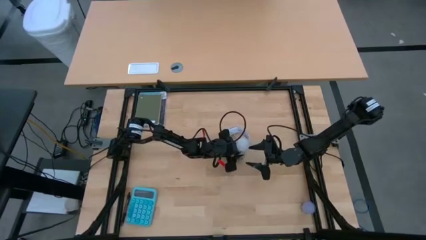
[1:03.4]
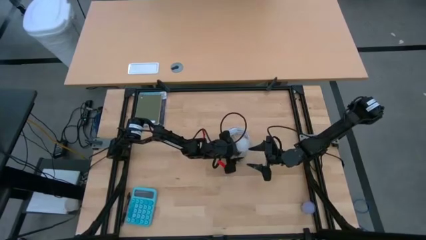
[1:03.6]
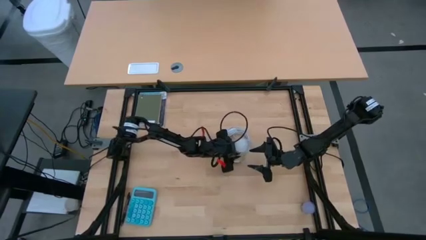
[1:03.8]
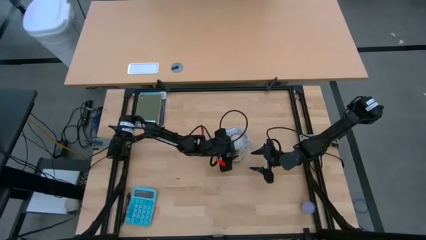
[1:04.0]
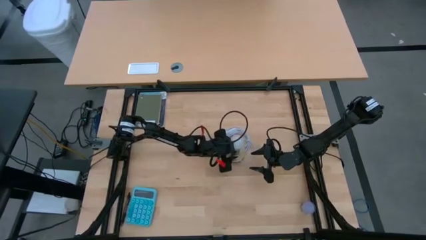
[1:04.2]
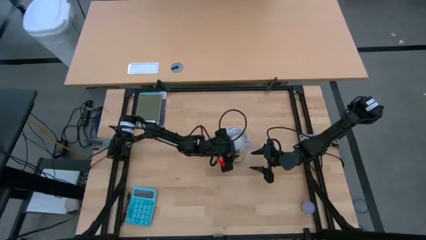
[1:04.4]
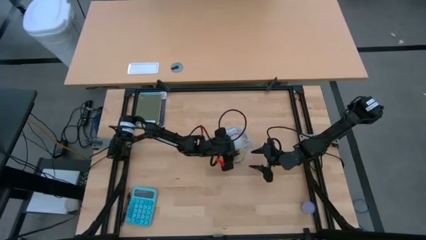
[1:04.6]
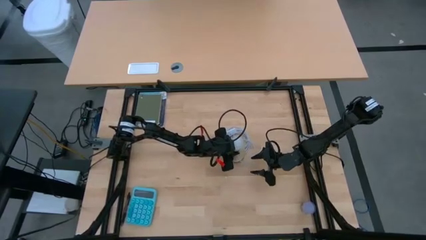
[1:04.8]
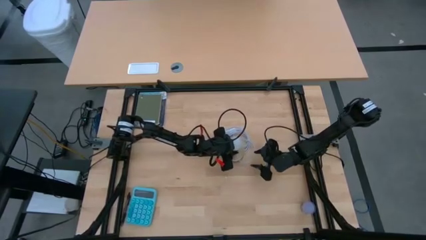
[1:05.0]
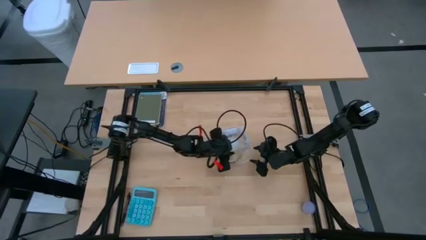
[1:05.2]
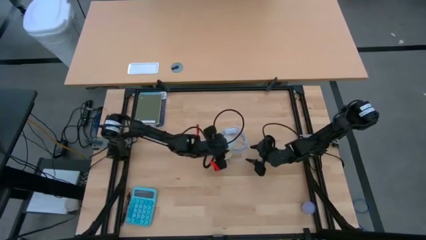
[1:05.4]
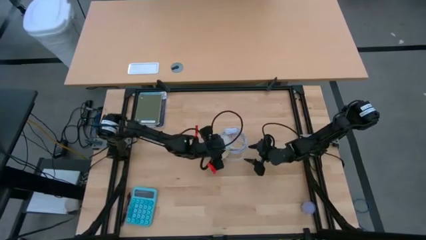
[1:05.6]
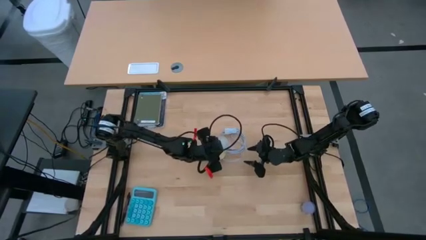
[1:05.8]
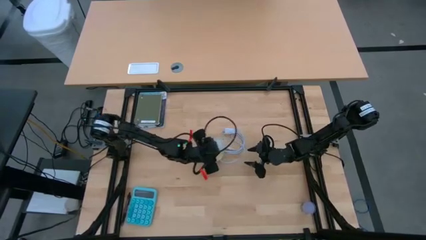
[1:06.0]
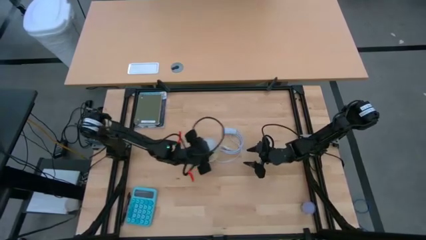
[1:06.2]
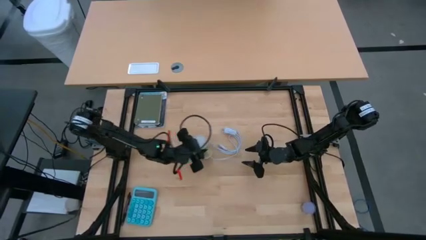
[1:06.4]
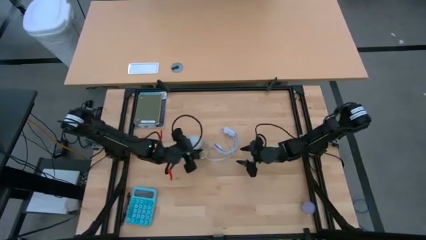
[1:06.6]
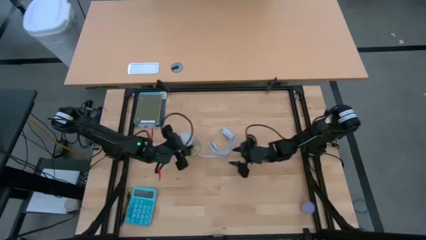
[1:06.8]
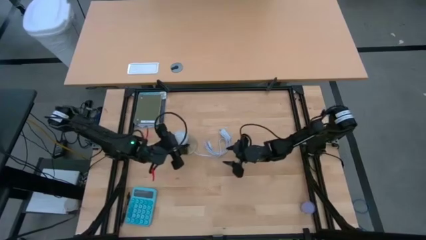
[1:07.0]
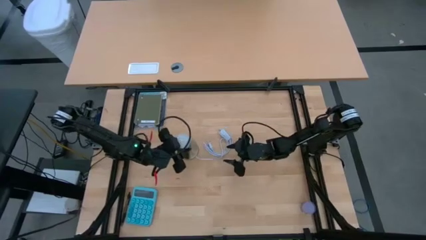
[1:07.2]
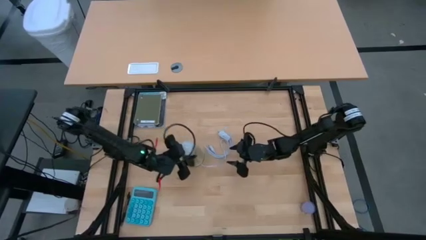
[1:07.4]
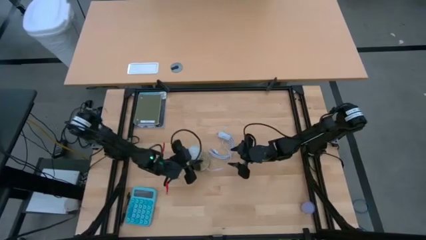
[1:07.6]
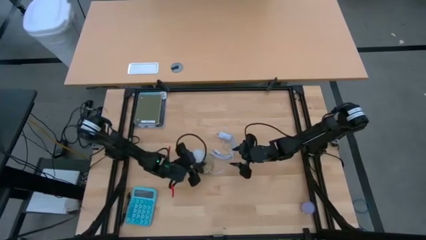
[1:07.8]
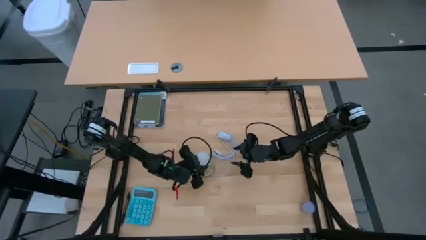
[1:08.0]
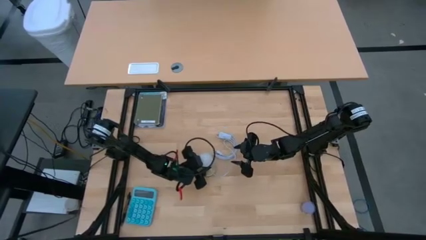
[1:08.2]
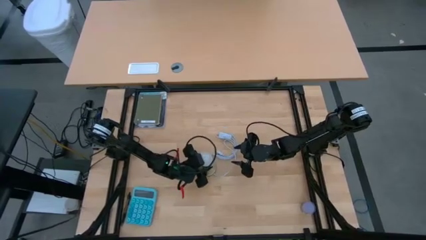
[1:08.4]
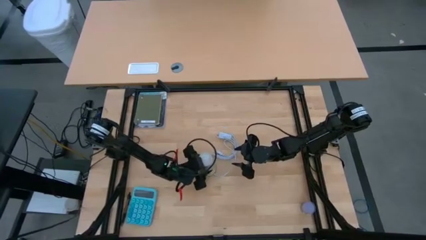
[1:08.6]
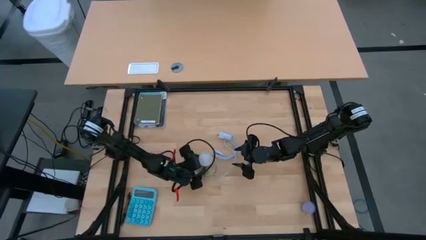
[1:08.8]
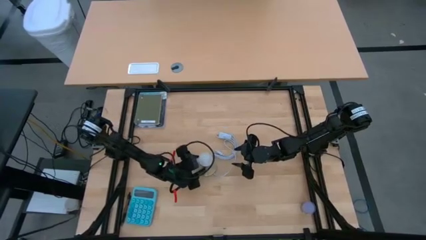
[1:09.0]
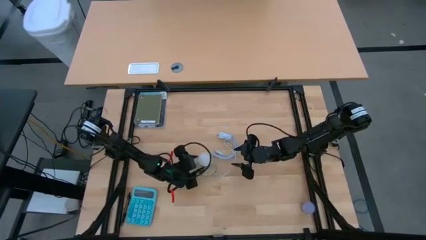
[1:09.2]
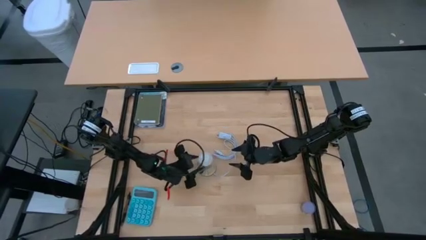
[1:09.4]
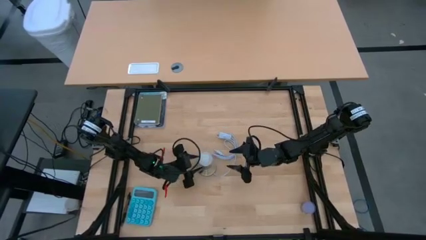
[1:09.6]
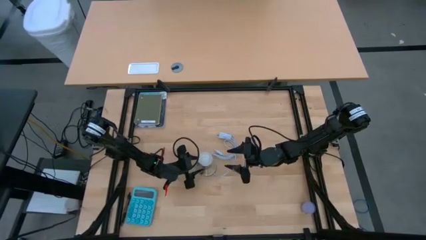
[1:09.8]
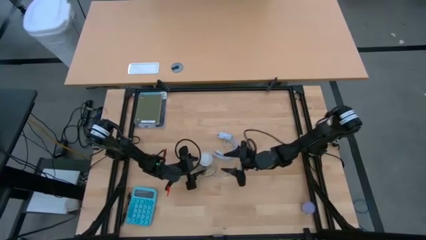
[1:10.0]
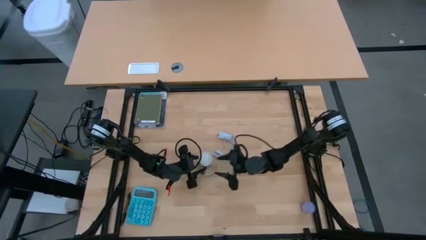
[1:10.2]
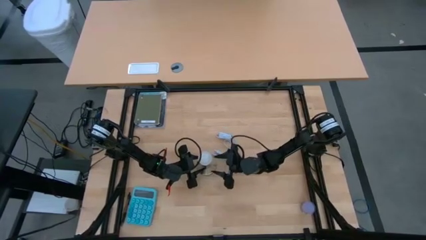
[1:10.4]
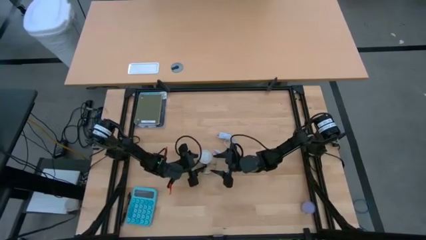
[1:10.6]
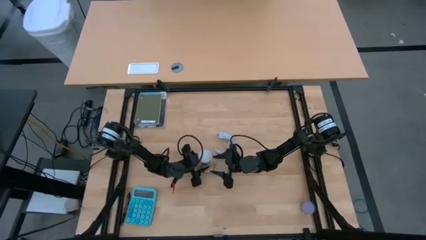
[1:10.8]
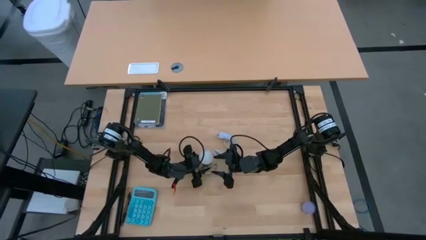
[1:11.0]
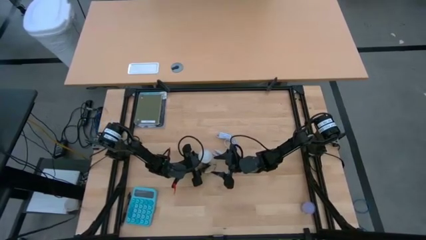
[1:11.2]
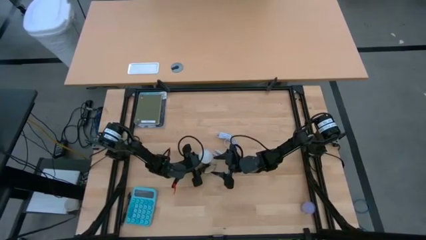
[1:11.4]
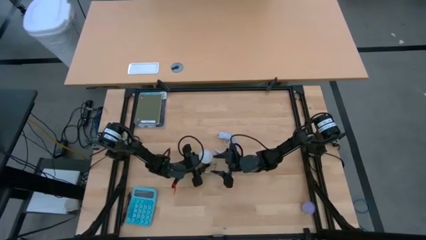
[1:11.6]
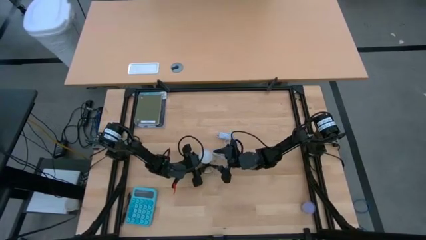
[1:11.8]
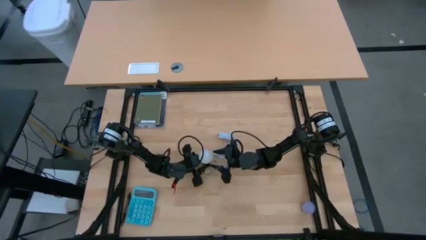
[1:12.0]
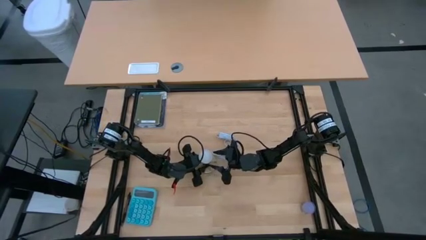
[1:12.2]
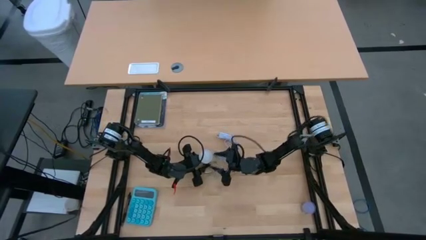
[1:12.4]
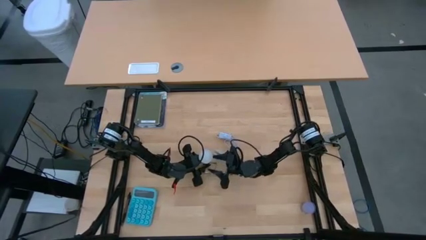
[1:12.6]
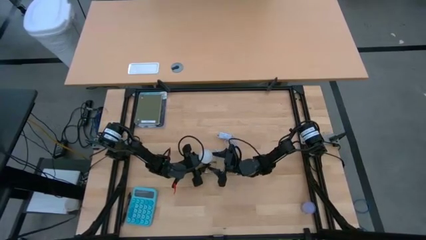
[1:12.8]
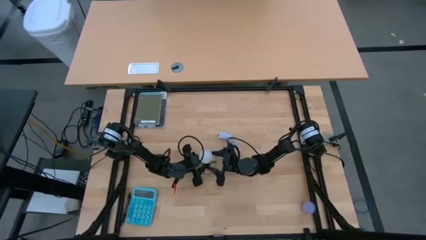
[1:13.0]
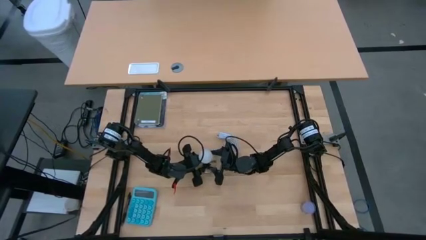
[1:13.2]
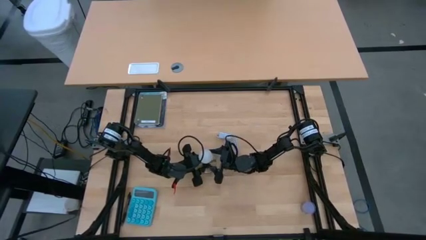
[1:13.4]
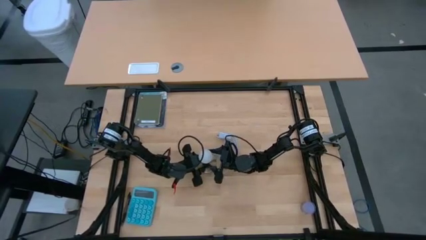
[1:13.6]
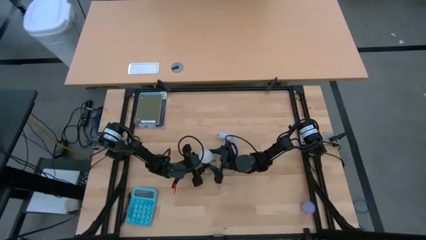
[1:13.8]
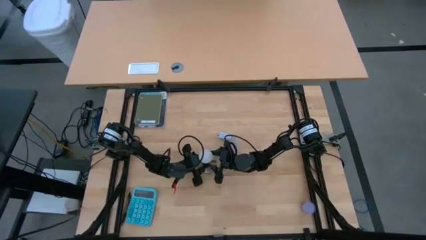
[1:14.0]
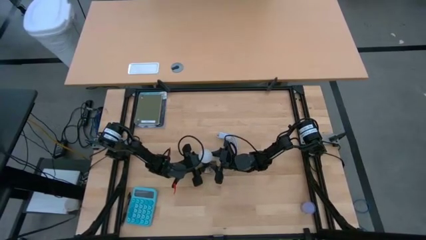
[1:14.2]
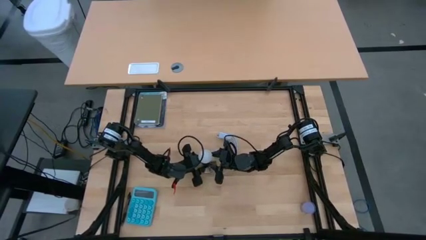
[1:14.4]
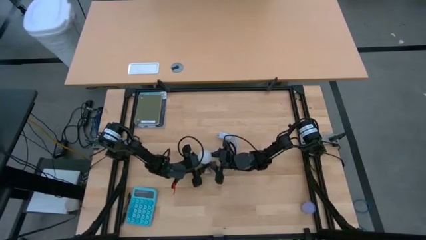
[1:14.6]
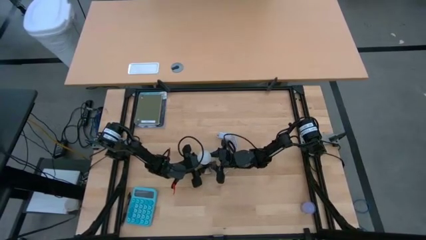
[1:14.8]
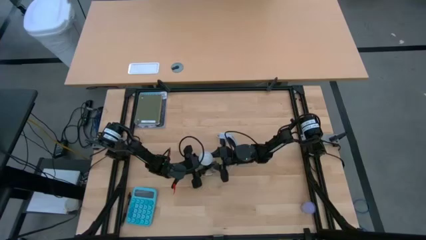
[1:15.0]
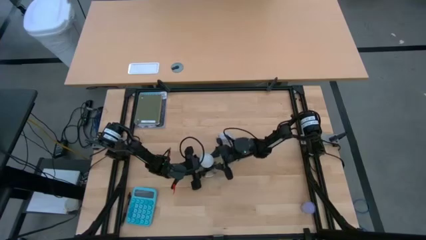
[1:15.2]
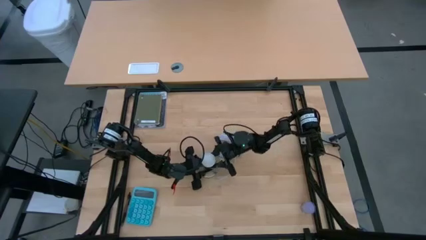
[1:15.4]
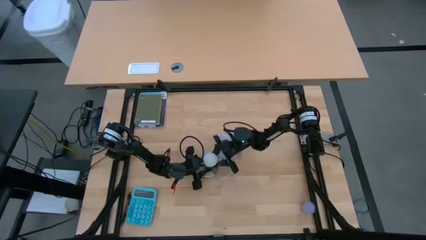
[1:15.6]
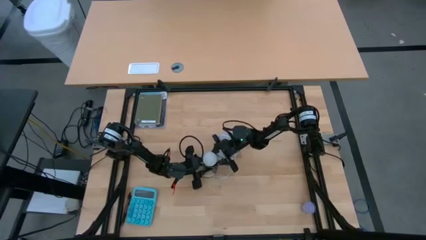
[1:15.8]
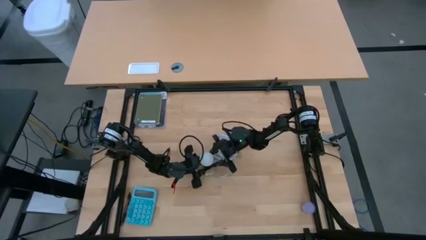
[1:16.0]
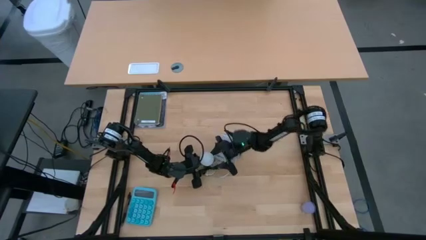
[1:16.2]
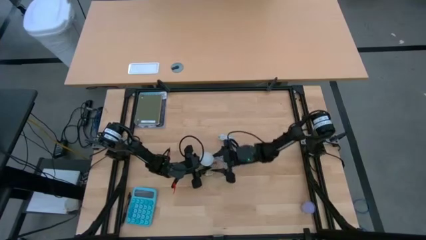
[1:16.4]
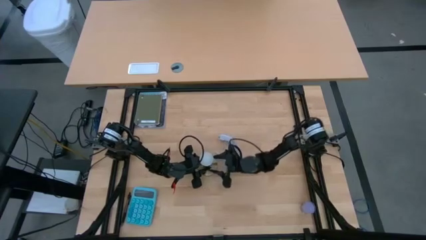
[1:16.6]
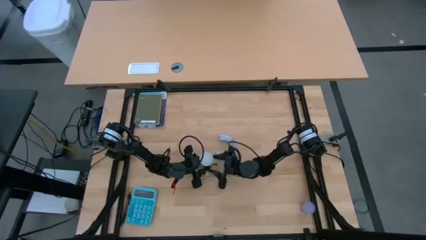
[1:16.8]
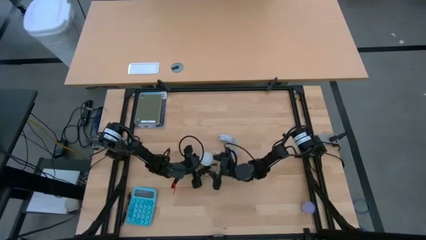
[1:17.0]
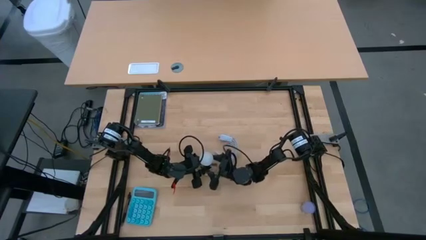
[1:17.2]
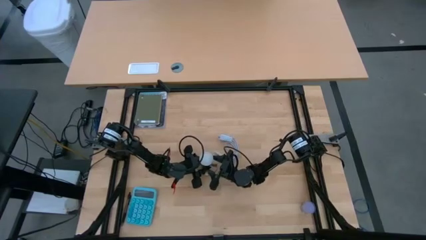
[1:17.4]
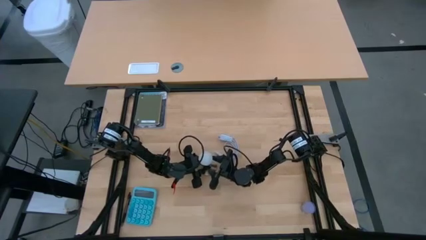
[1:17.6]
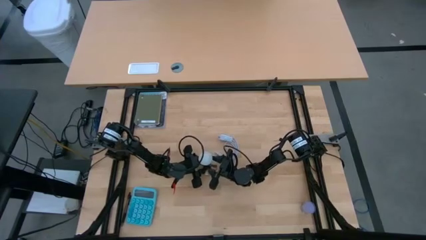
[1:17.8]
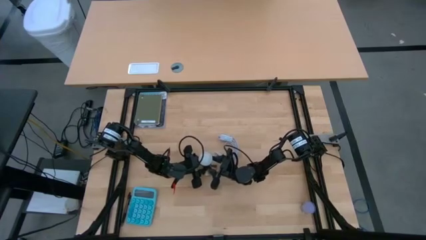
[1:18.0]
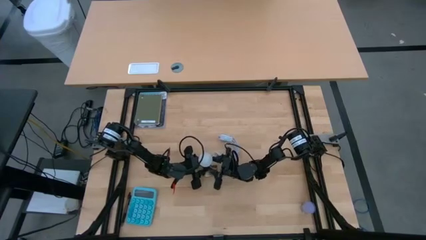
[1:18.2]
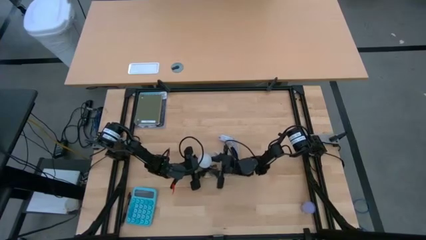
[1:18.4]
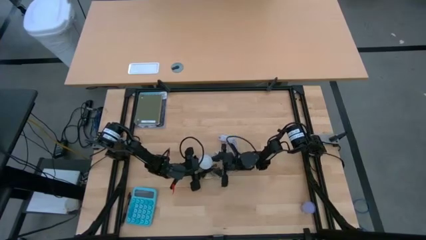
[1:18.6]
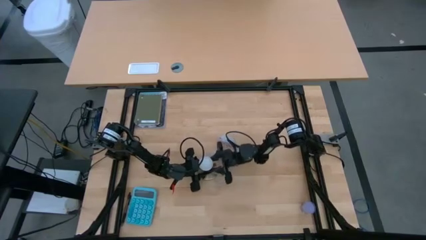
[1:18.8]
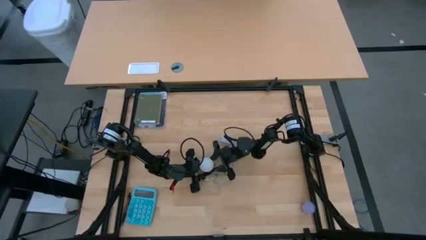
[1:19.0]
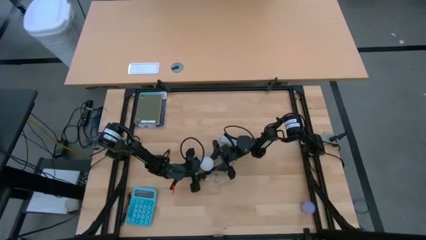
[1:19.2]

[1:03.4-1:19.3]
Task: Screw lightbulb
Remove the lightbulb from the lamp
